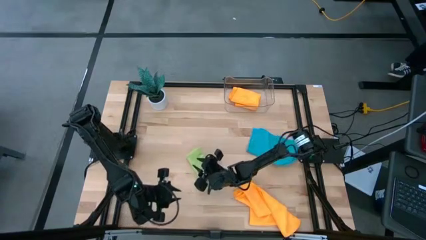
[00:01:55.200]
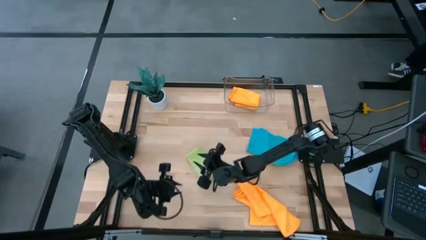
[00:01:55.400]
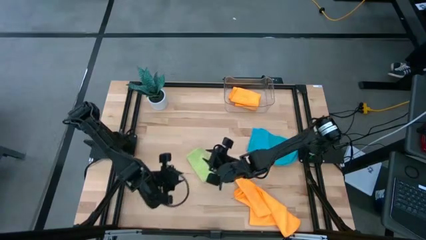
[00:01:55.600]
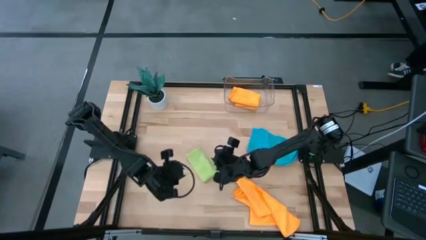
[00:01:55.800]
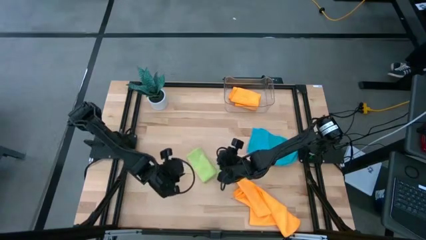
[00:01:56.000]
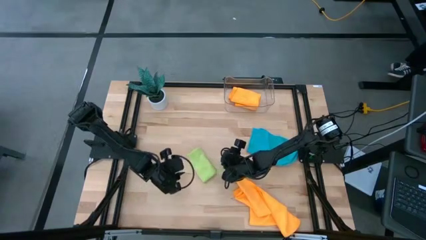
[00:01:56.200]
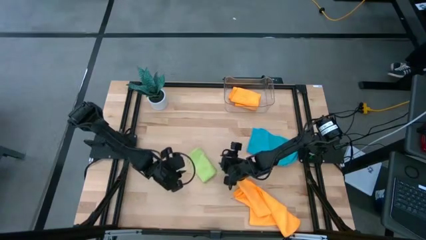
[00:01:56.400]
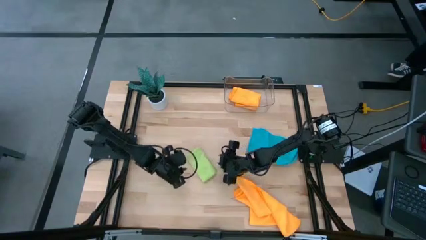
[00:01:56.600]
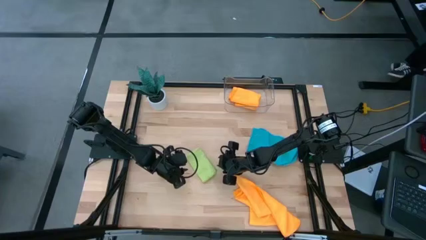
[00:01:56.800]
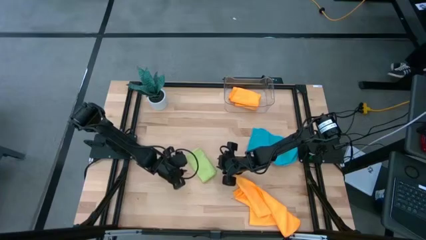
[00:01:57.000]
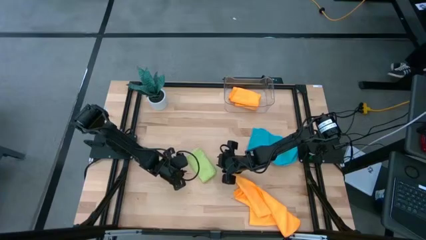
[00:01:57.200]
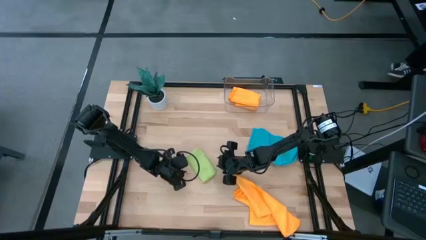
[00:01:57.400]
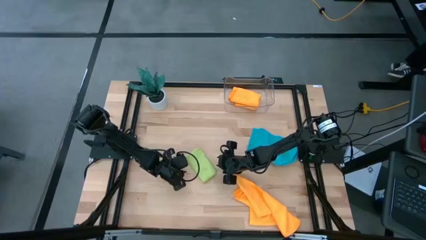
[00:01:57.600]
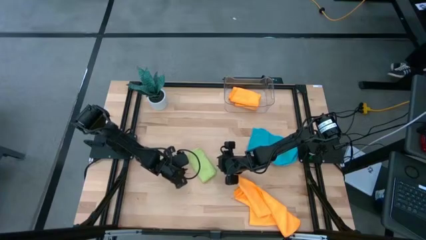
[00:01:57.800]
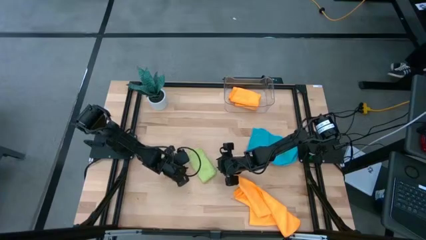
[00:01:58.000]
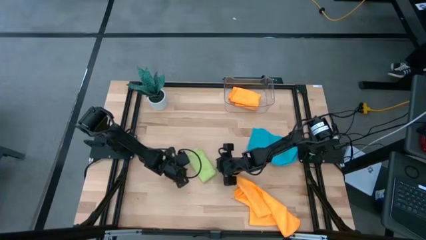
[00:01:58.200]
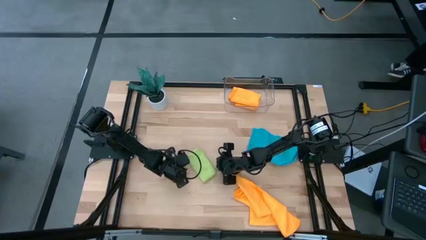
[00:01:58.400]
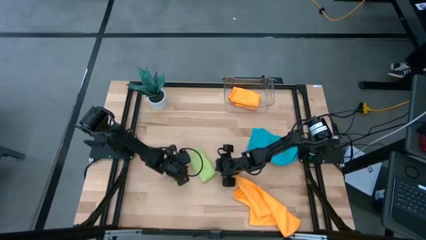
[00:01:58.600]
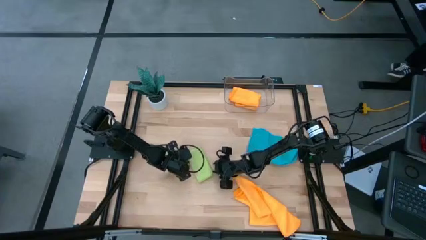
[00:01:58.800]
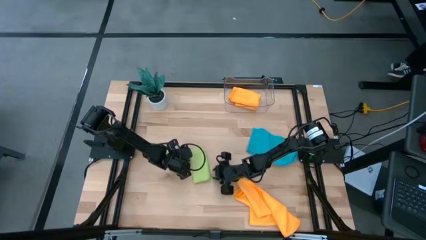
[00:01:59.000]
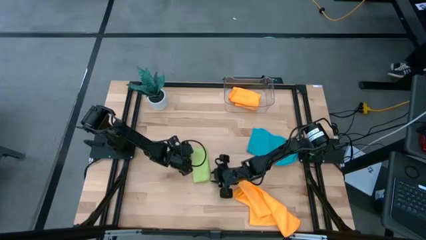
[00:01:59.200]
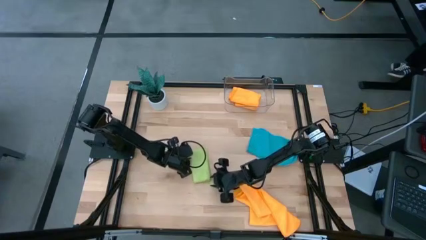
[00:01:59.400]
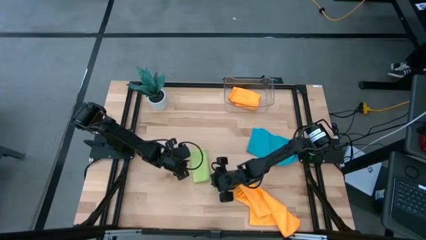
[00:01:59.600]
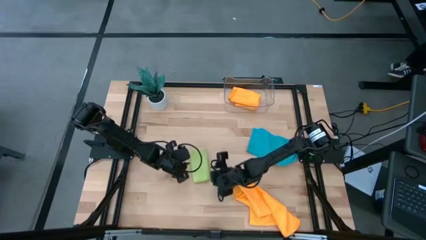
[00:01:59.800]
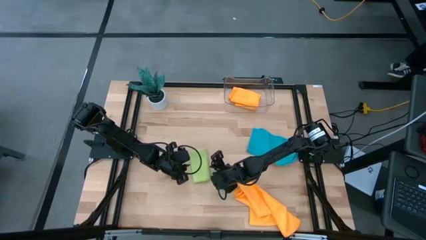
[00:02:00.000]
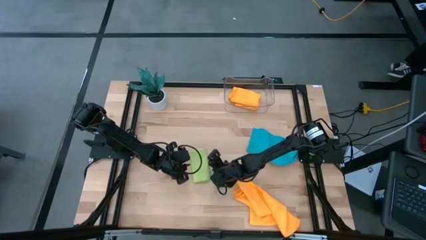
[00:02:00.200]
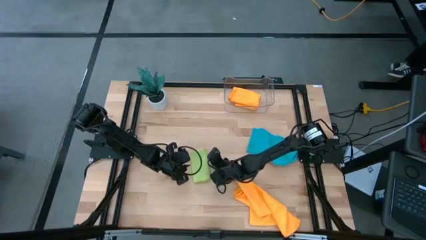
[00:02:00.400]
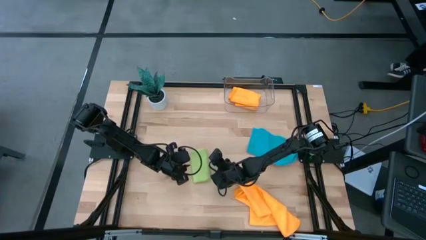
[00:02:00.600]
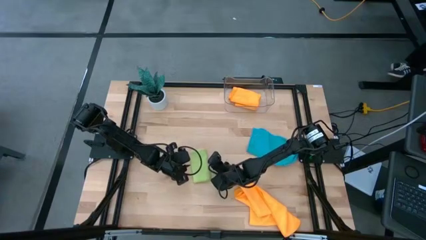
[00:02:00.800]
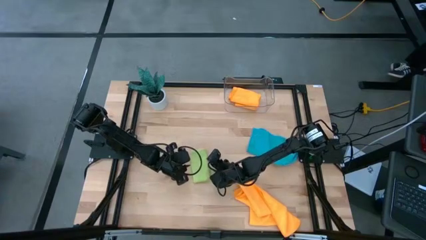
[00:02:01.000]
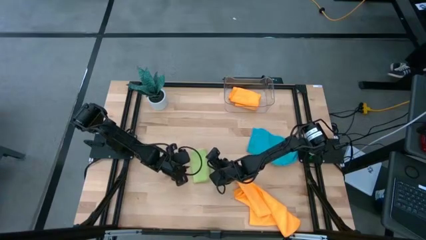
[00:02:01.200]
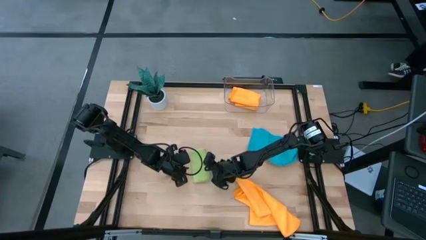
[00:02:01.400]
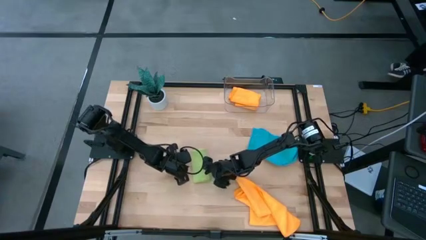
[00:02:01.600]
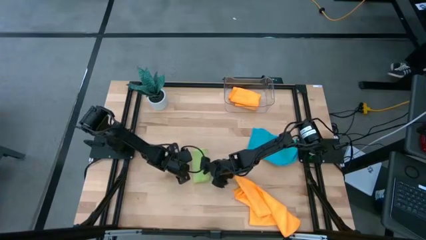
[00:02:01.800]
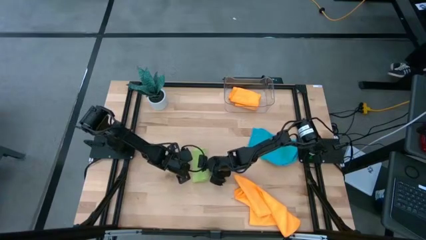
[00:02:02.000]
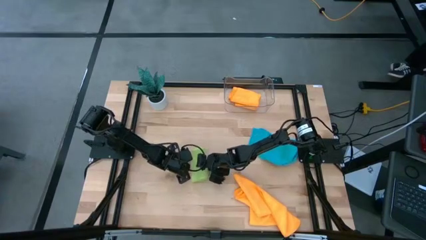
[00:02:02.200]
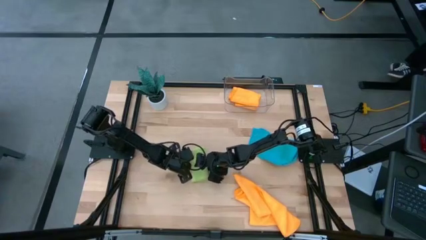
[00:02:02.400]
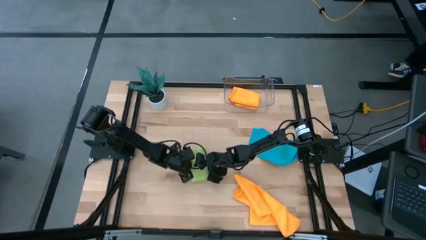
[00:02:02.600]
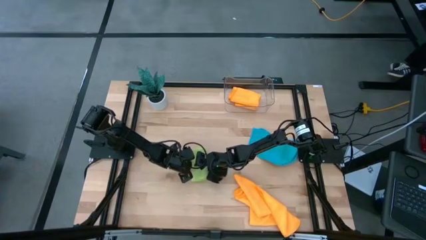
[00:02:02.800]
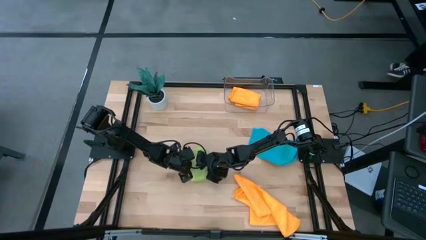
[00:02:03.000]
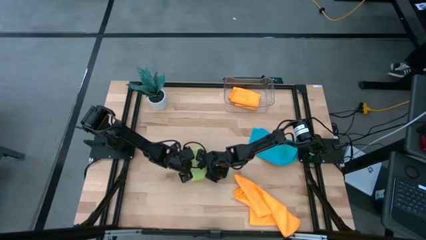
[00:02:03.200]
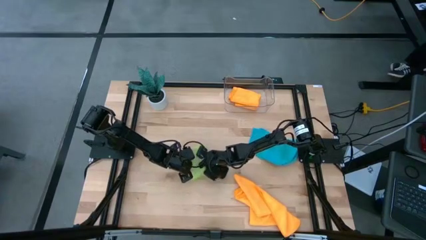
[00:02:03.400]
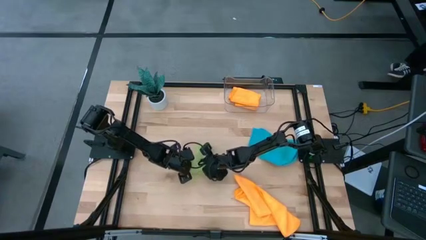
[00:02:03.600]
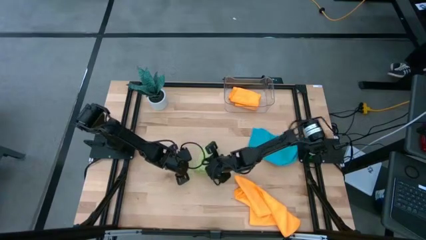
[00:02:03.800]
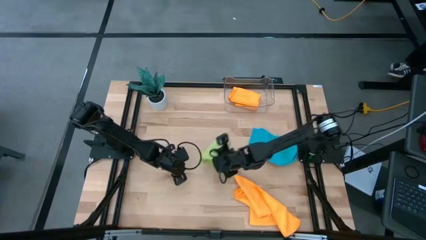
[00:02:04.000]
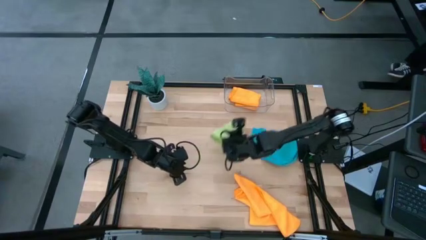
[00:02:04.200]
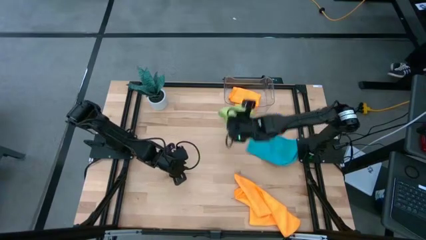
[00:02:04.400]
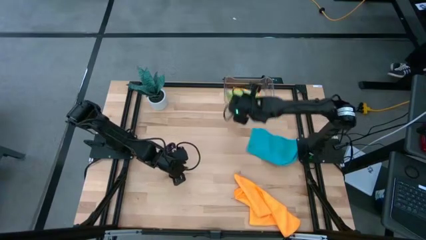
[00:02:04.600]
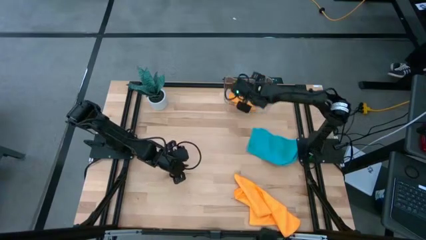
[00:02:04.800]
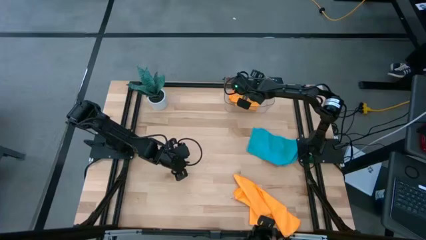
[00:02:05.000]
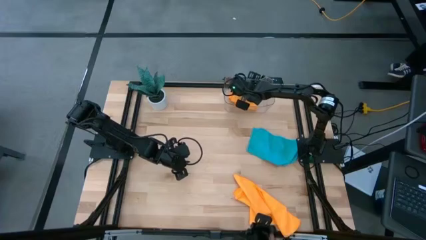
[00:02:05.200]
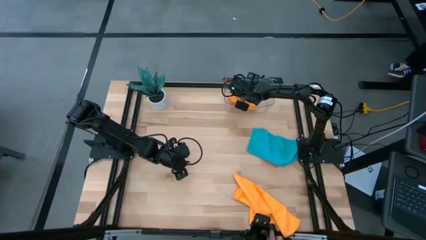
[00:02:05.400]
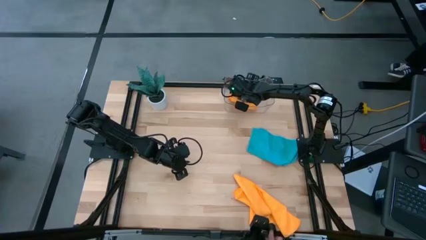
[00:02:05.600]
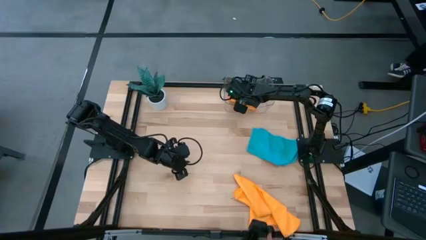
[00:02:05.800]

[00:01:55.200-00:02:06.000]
Task: Fold microfiber towels
Put the folded green microfiber towel into the transparent bin
